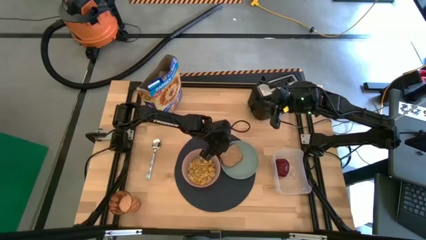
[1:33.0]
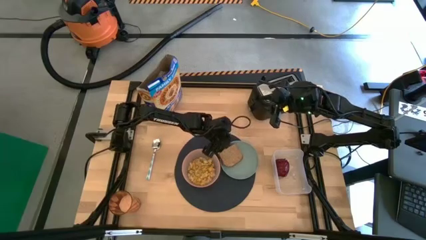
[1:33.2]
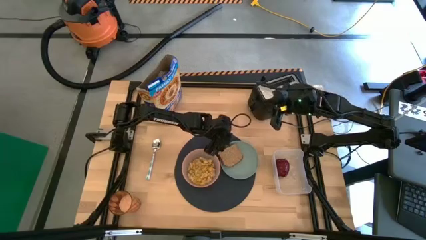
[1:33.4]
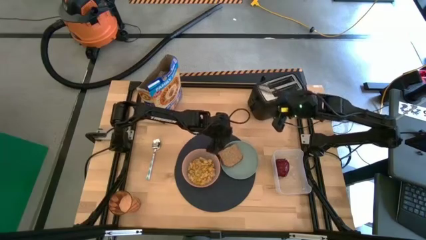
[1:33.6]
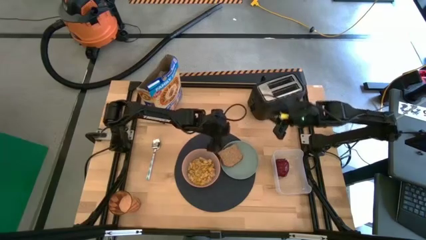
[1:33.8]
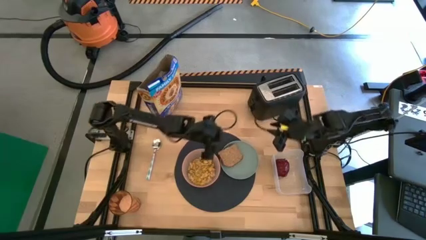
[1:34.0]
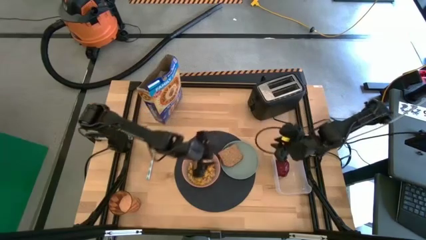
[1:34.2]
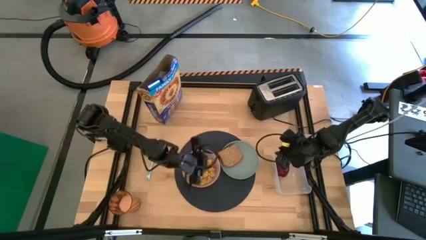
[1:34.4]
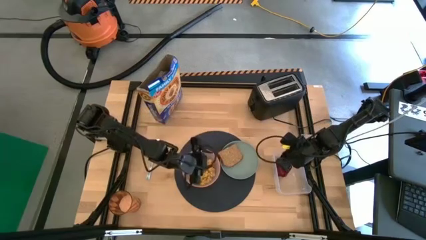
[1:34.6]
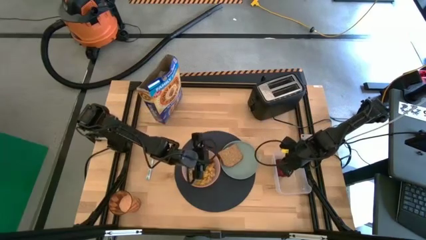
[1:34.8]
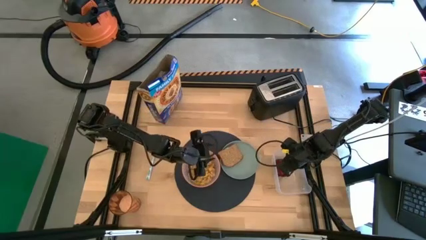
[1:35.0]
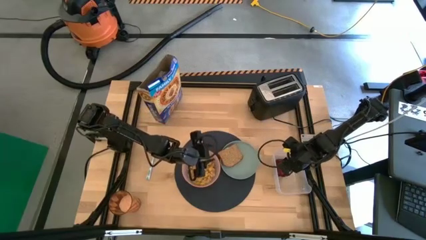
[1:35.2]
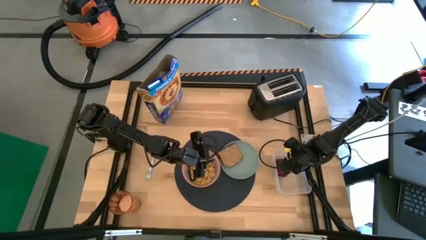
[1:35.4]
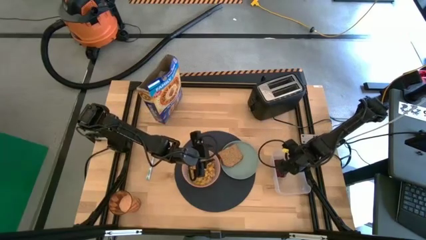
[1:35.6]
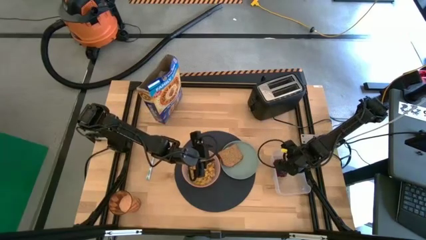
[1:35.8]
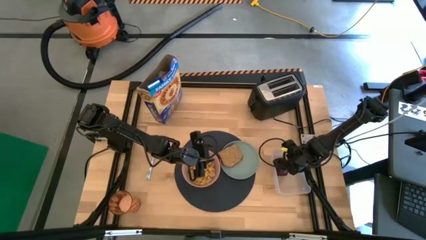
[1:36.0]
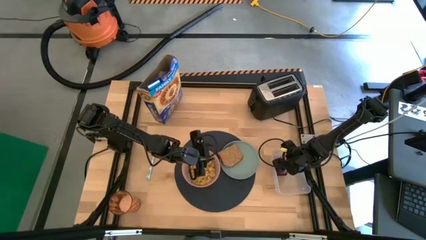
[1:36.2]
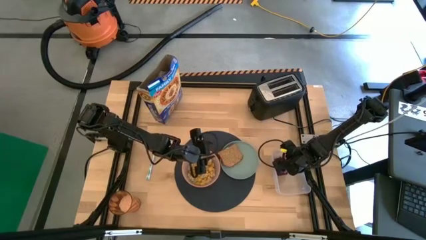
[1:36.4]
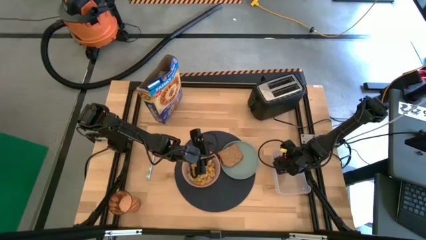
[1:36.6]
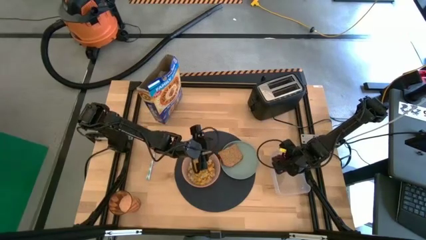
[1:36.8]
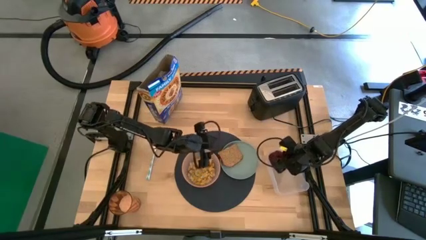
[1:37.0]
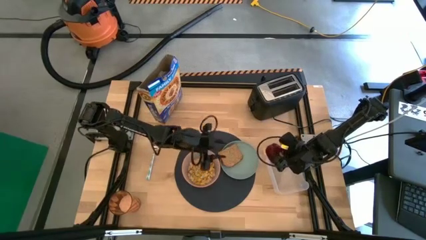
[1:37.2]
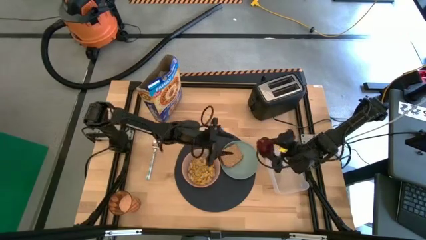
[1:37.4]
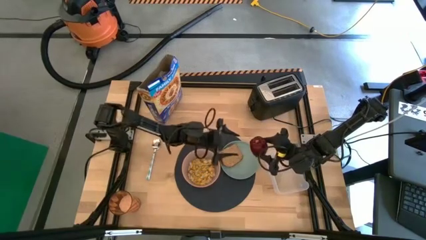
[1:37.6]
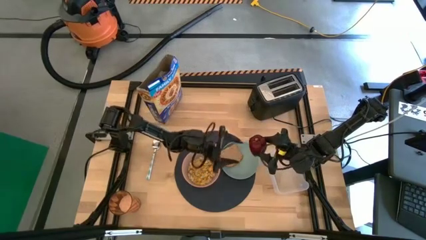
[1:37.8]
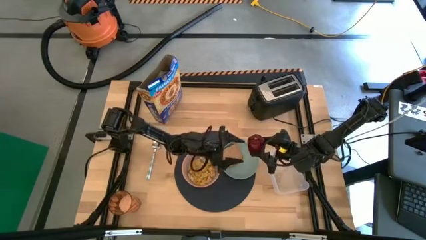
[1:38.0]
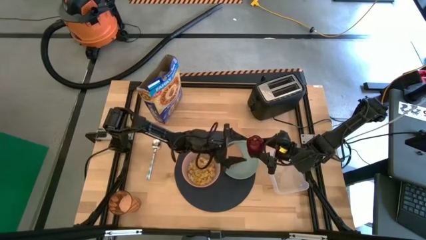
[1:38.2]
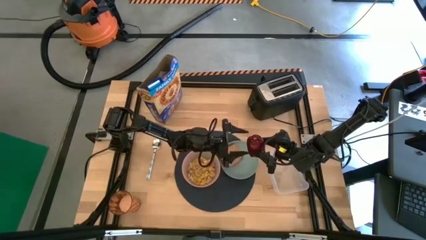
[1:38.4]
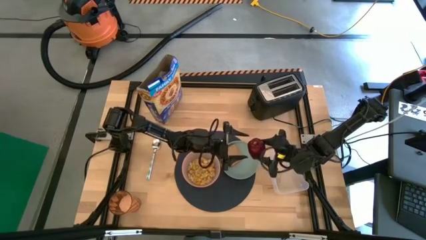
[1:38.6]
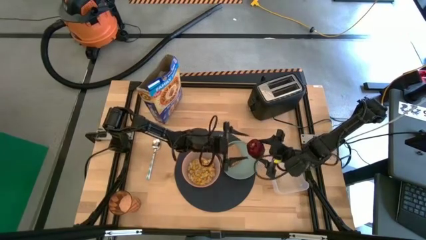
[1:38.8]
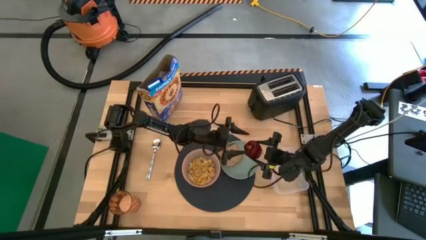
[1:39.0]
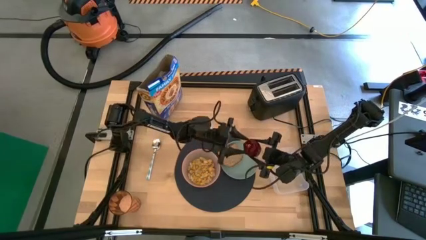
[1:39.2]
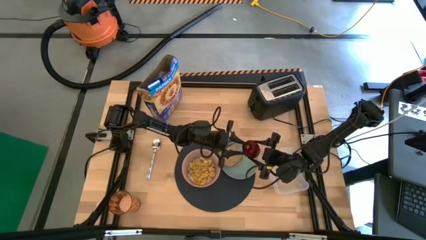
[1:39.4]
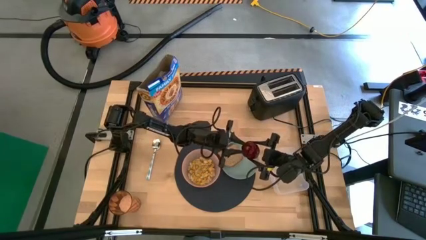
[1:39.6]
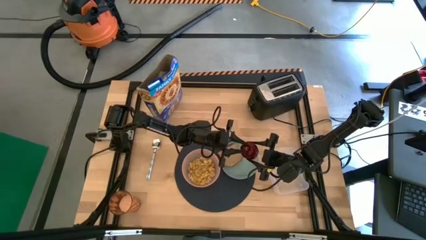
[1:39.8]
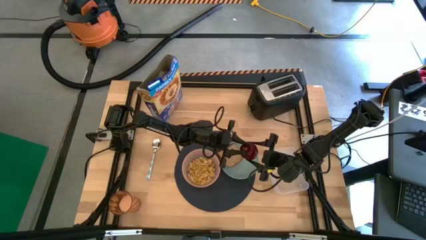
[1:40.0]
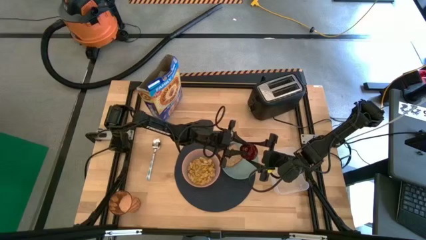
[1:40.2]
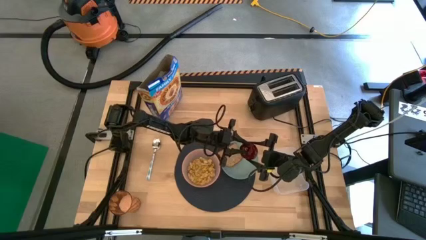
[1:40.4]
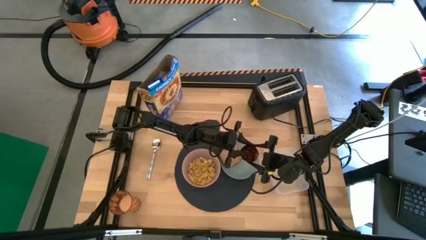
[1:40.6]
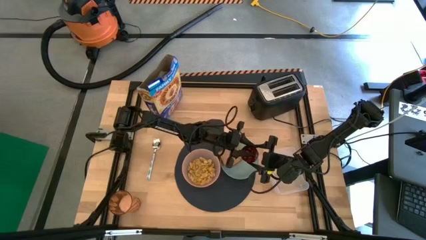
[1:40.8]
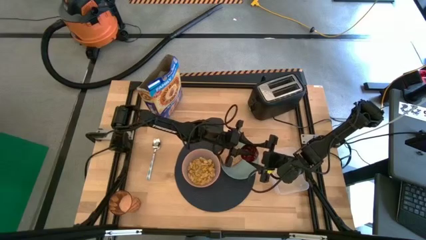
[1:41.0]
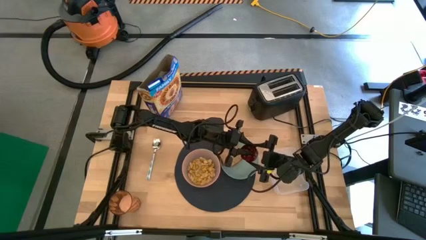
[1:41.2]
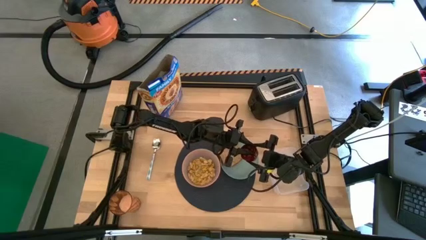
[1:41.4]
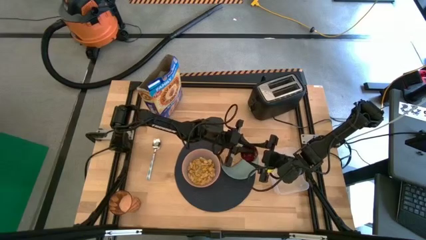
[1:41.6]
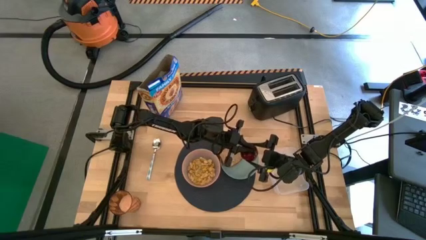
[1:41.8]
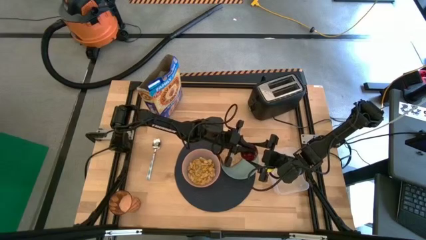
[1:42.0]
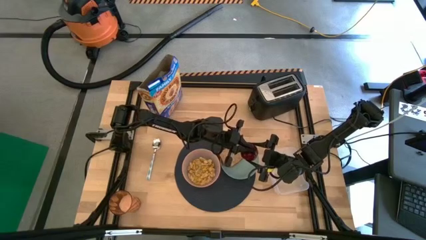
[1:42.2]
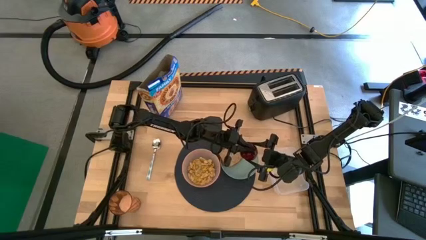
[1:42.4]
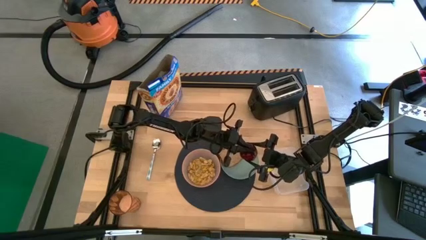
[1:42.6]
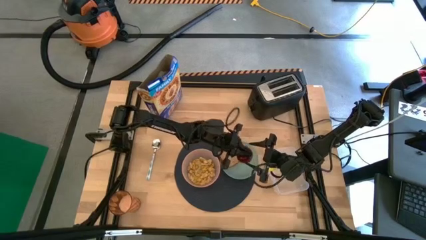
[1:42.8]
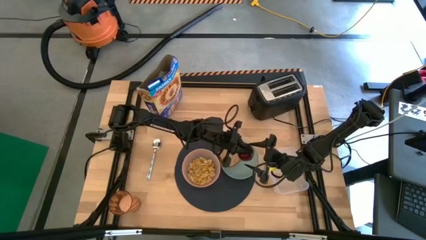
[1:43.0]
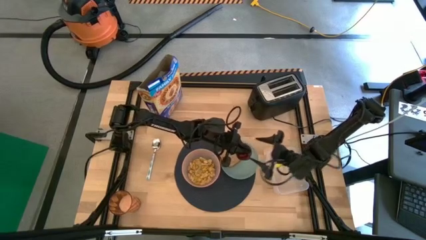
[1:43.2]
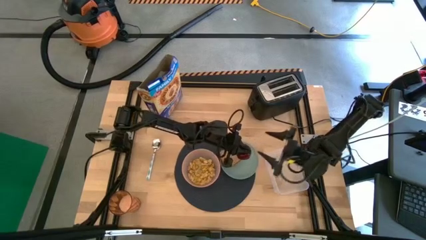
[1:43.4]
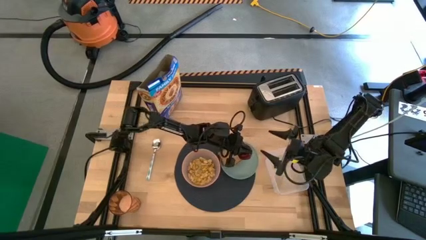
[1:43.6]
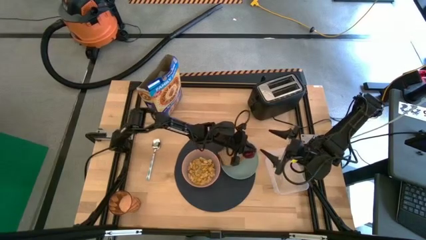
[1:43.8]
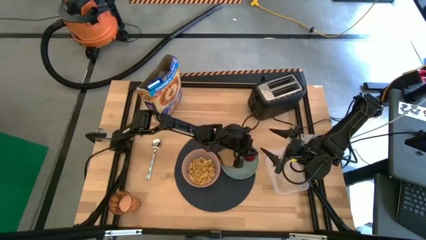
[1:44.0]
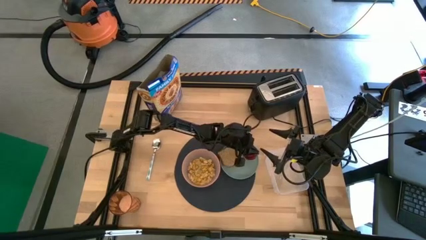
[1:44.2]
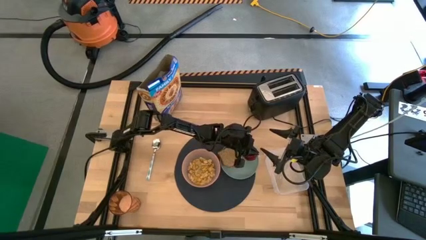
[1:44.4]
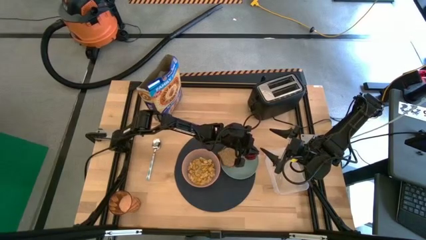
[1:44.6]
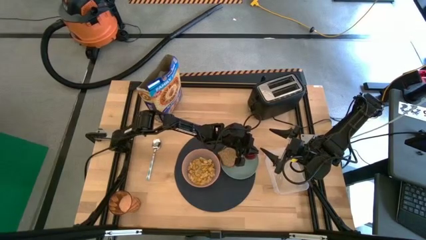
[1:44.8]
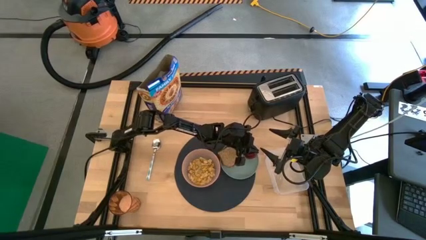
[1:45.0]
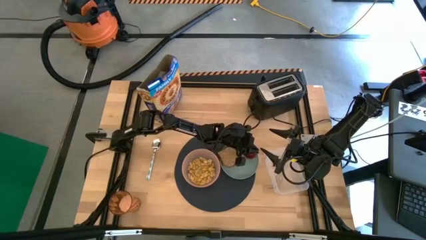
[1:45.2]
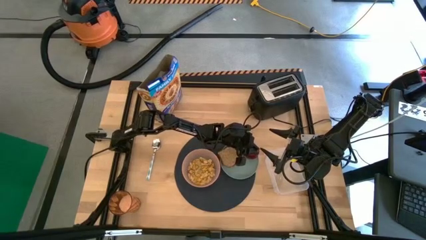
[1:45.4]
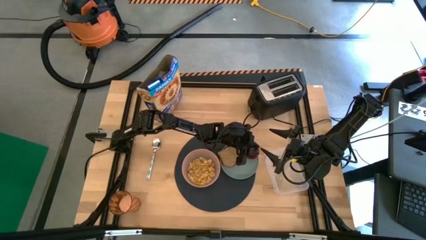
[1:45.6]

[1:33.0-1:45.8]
Task: Arrange a breakfast setting
Put the red apple on the light blue plate to the right of the toasted bread

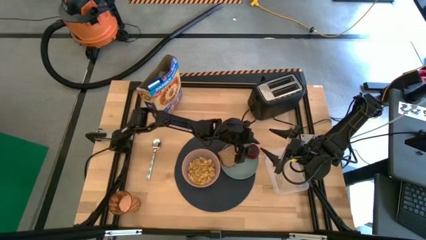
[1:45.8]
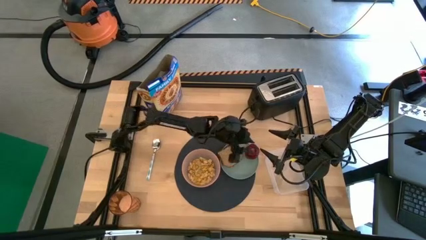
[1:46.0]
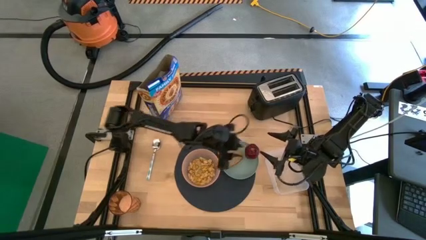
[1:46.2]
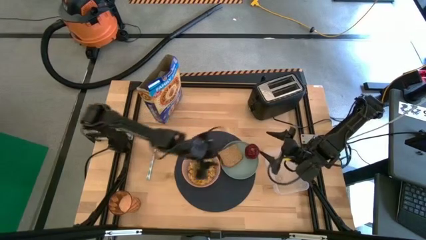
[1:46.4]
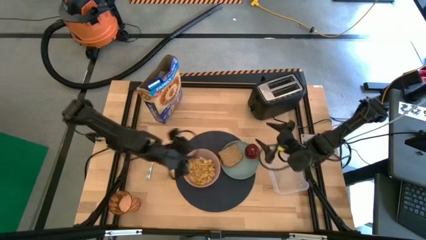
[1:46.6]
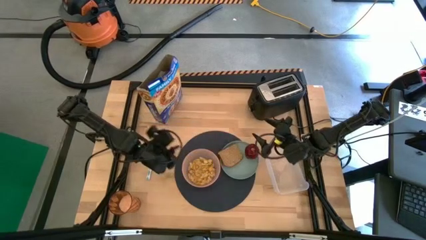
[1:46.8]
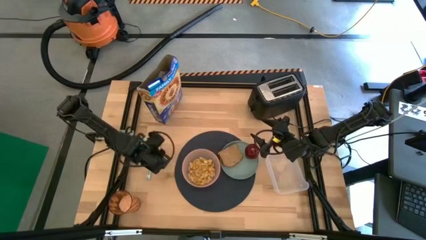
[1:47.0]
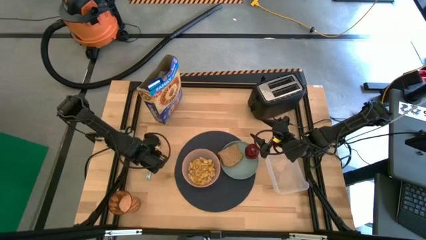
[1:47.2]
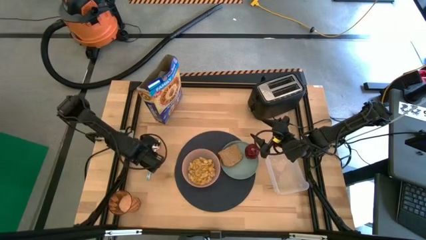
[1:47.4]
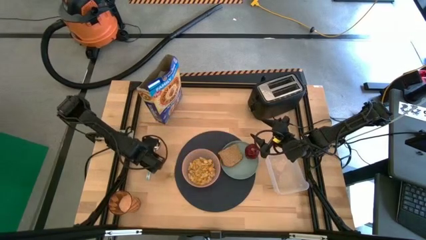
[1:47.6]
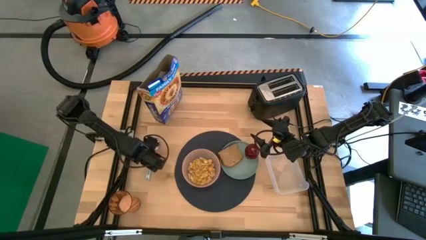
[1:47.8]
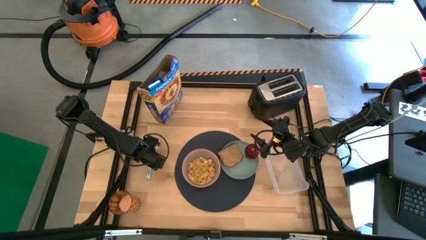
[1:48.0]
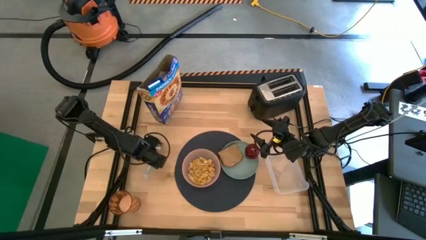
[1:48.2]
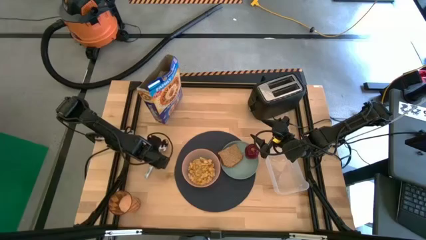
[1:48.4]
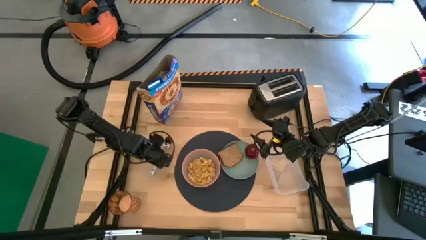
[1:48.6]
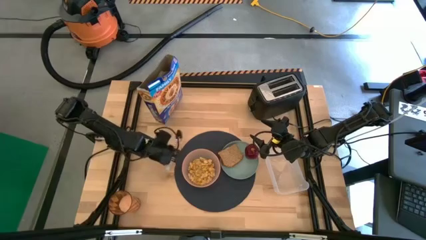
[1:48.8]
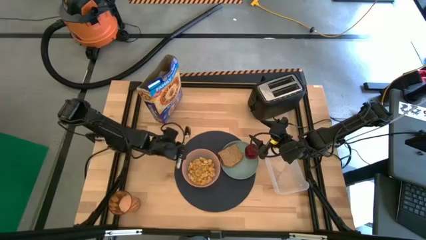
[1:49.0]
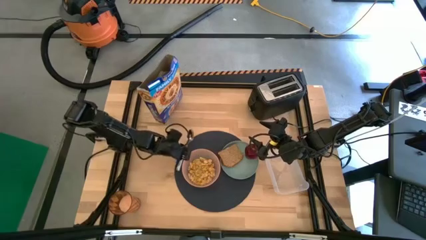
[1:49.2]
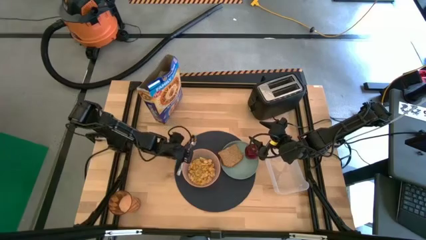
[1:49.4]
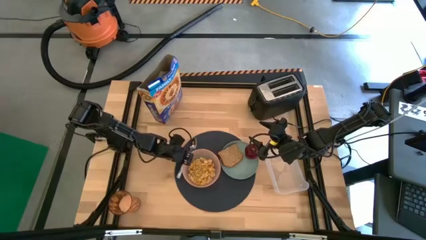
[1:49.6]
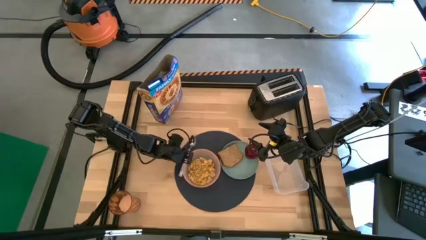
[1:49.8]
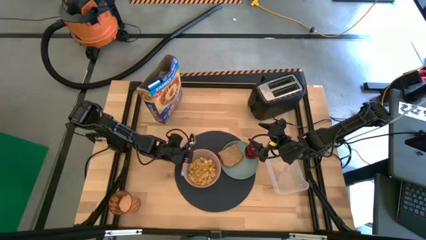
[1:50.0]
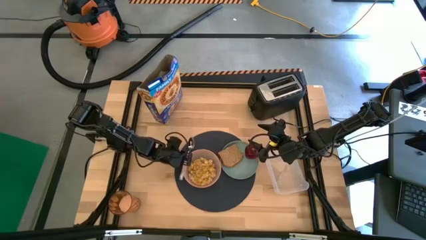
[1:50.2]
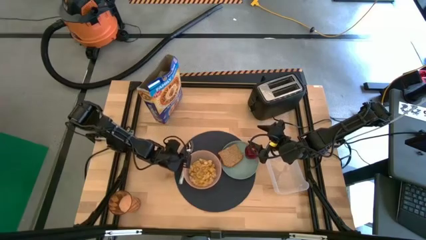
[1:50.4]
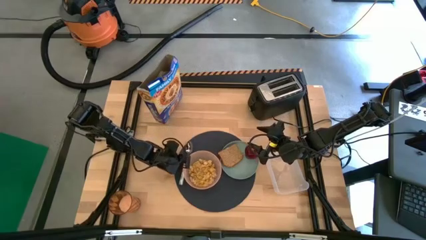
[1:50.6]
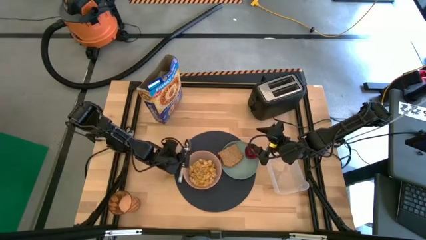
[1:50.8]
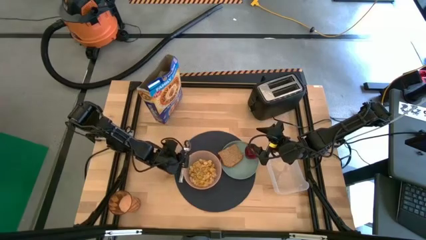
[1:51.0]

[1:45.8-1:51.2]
Put the white patterned spoon on the black placemat to the left of the pink bowl
